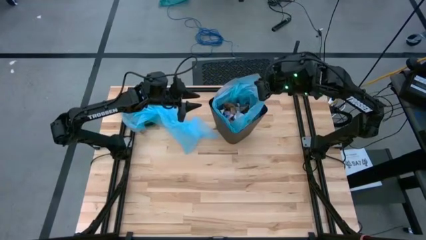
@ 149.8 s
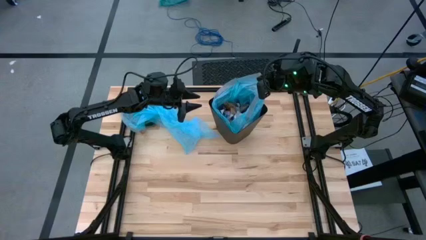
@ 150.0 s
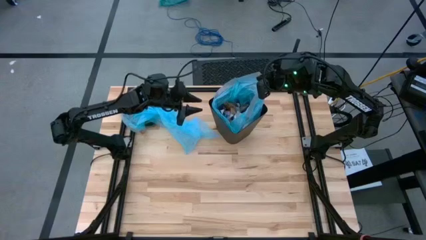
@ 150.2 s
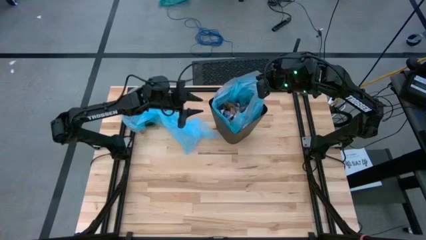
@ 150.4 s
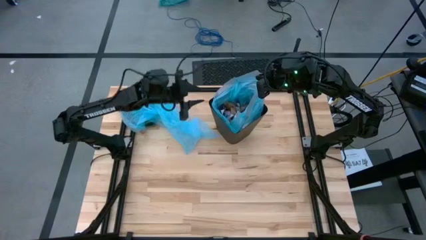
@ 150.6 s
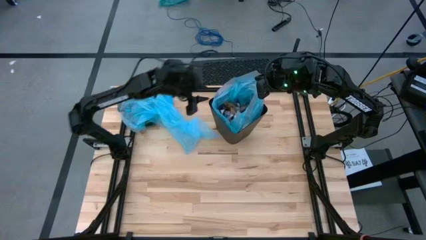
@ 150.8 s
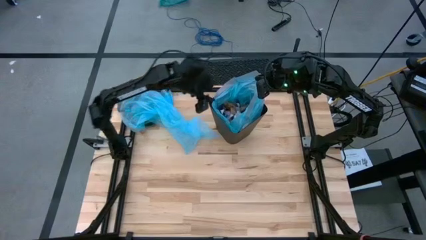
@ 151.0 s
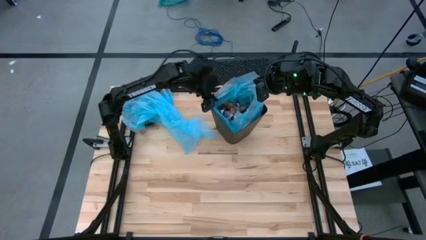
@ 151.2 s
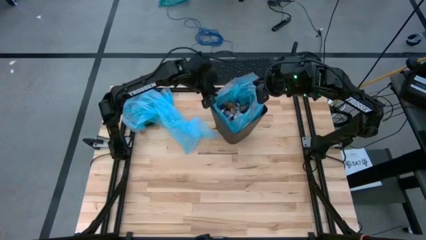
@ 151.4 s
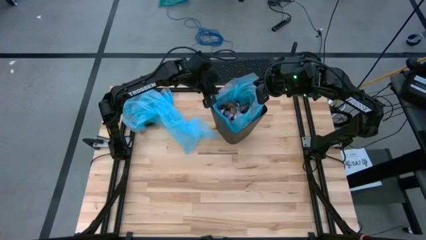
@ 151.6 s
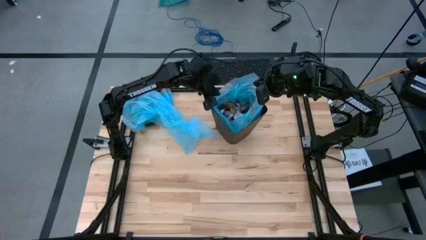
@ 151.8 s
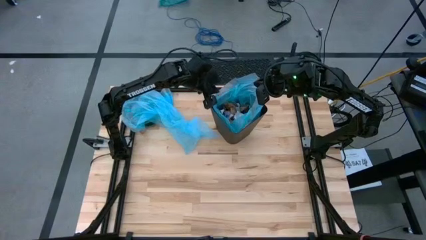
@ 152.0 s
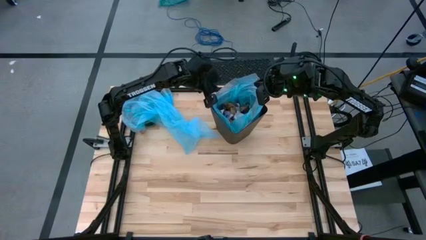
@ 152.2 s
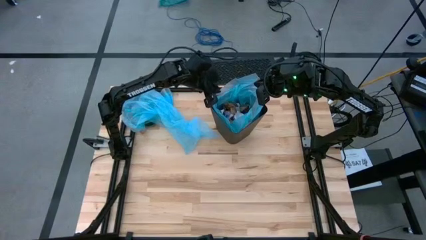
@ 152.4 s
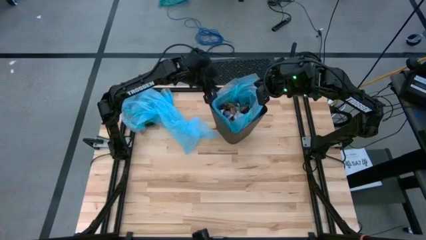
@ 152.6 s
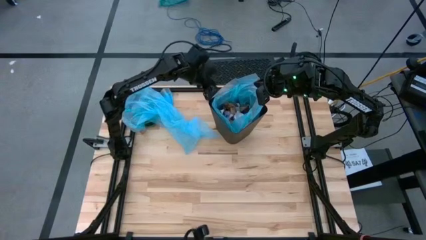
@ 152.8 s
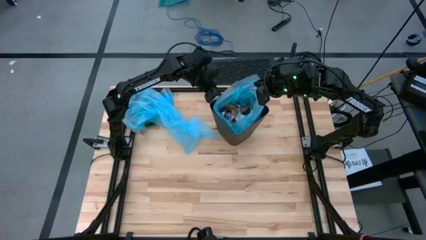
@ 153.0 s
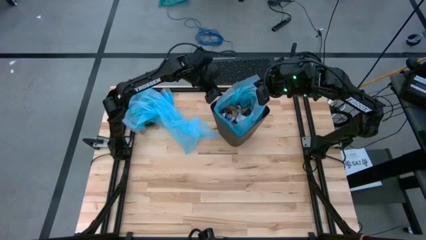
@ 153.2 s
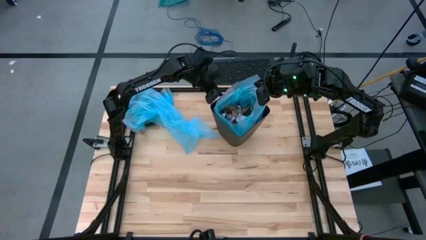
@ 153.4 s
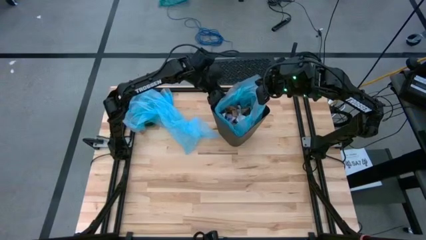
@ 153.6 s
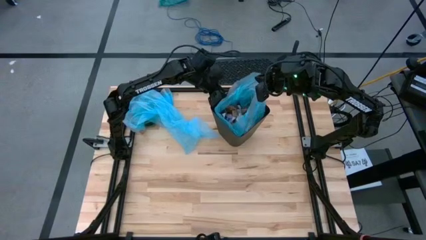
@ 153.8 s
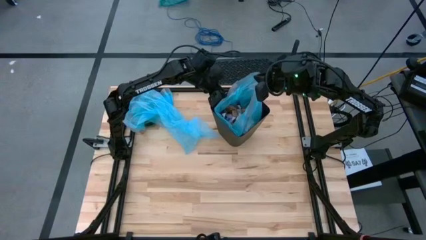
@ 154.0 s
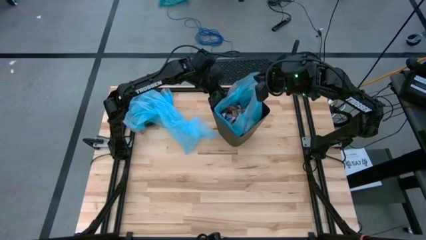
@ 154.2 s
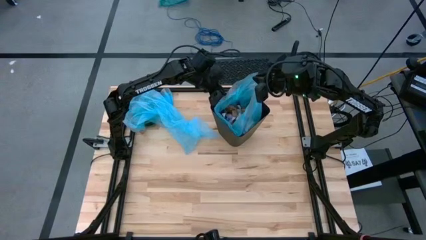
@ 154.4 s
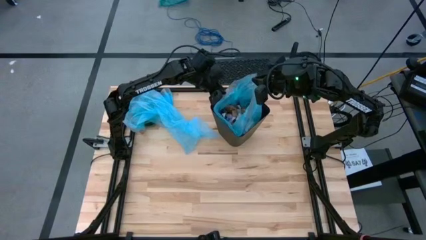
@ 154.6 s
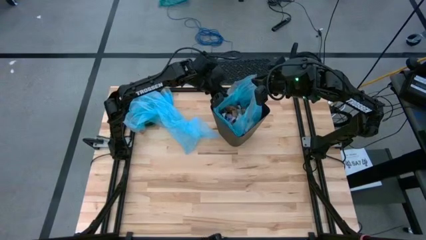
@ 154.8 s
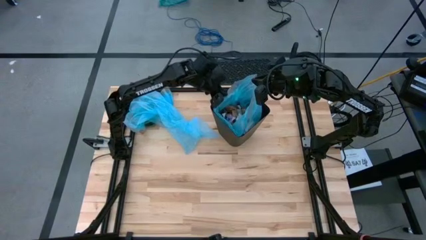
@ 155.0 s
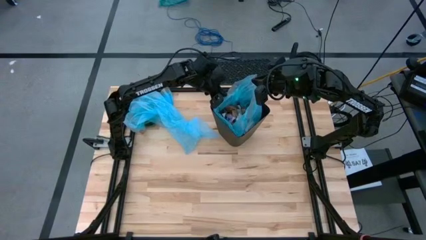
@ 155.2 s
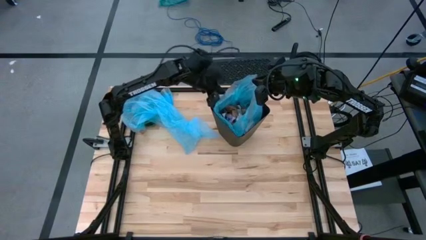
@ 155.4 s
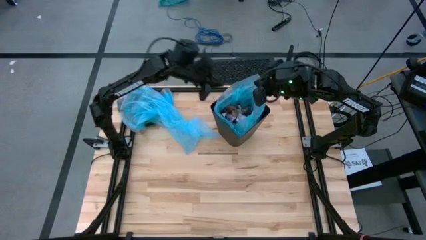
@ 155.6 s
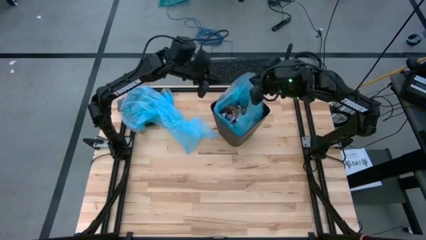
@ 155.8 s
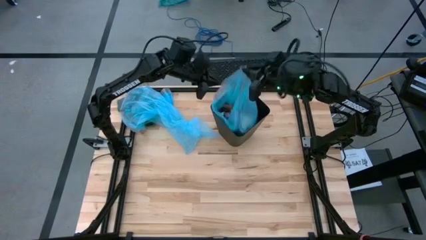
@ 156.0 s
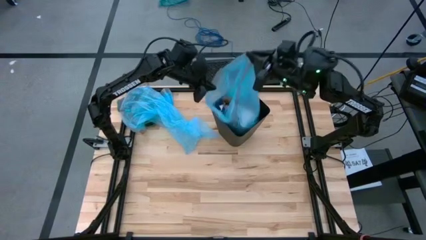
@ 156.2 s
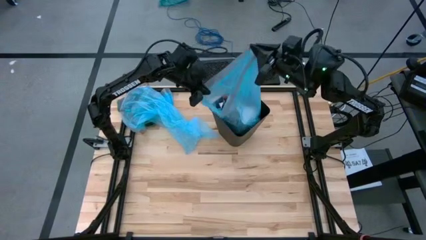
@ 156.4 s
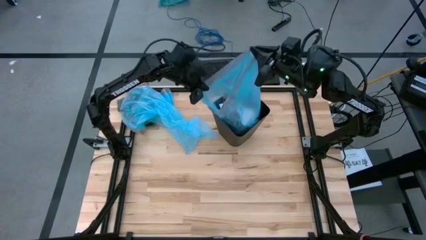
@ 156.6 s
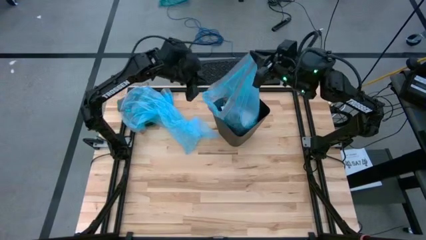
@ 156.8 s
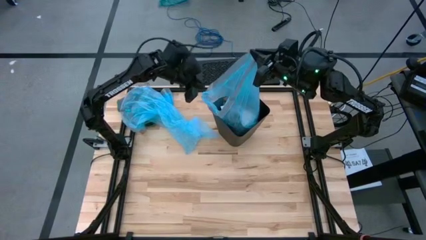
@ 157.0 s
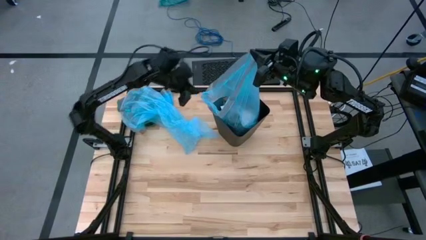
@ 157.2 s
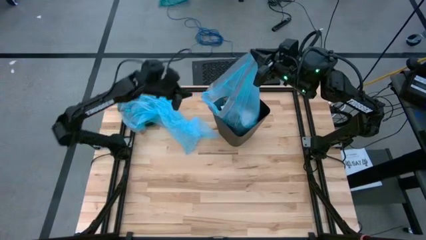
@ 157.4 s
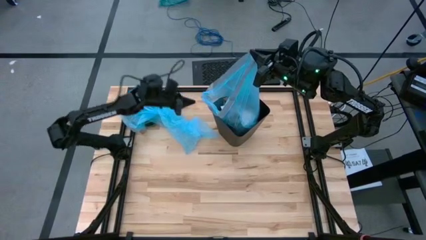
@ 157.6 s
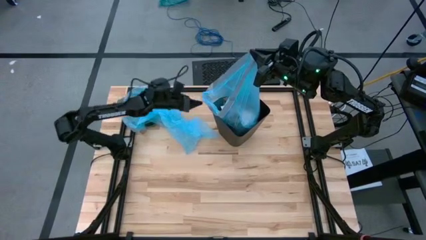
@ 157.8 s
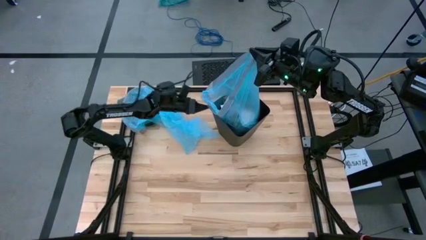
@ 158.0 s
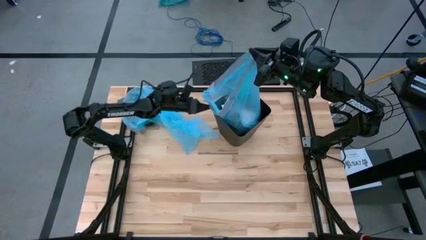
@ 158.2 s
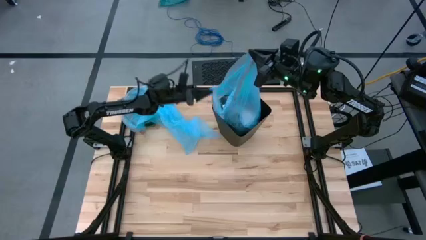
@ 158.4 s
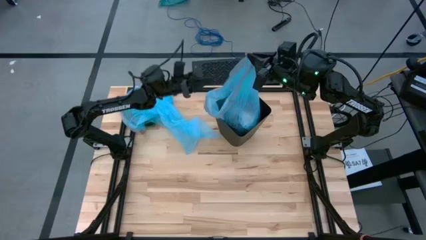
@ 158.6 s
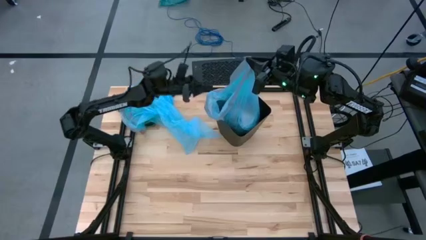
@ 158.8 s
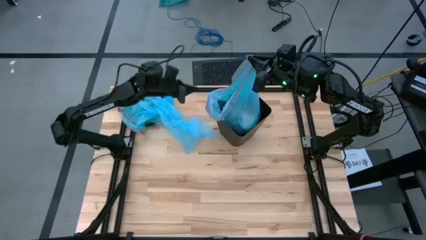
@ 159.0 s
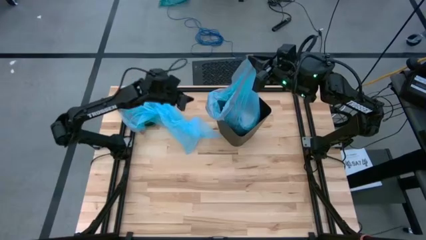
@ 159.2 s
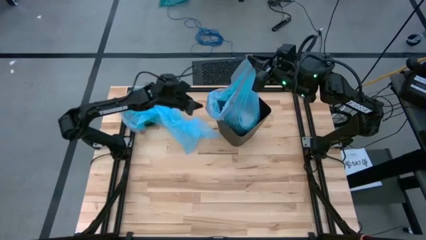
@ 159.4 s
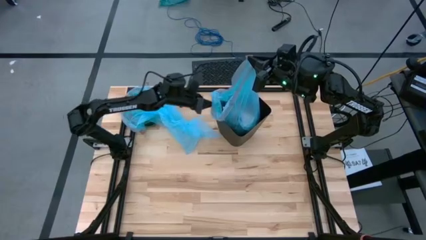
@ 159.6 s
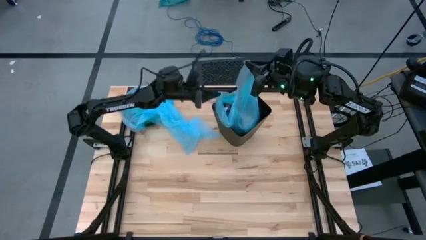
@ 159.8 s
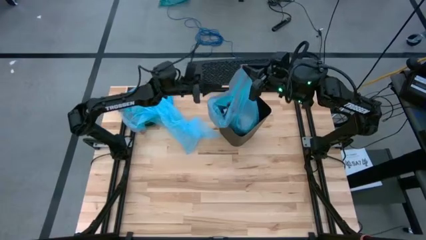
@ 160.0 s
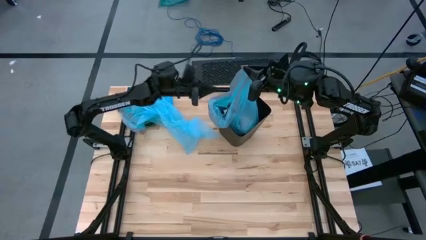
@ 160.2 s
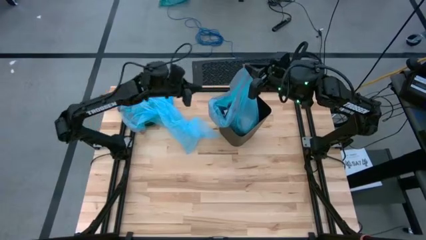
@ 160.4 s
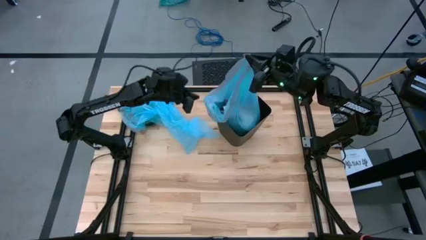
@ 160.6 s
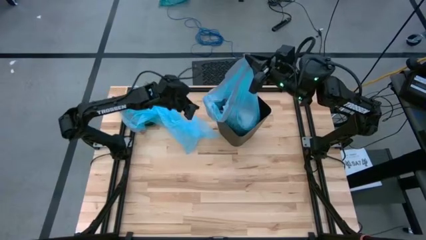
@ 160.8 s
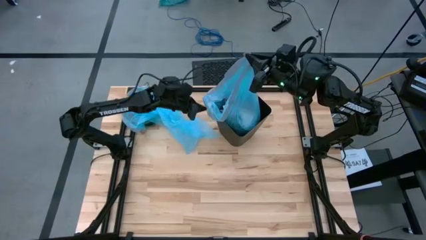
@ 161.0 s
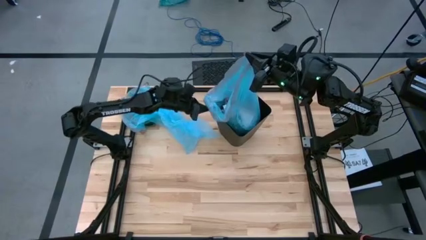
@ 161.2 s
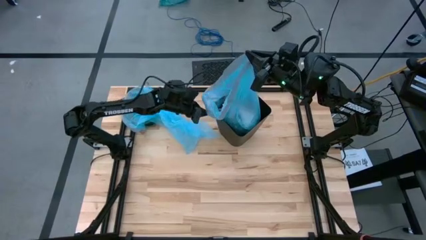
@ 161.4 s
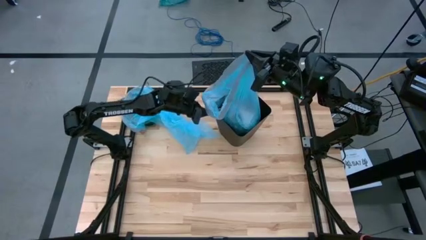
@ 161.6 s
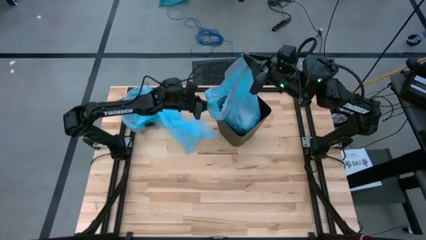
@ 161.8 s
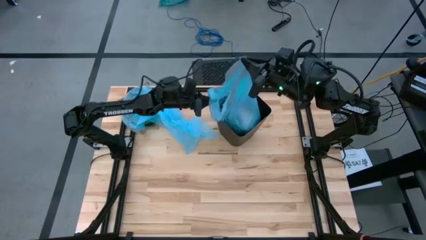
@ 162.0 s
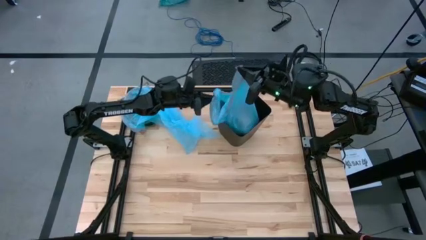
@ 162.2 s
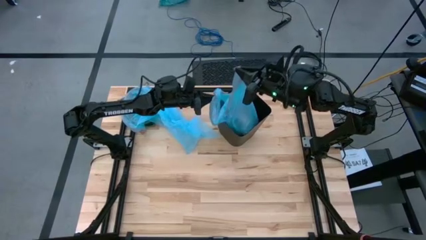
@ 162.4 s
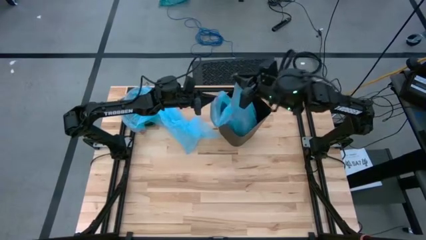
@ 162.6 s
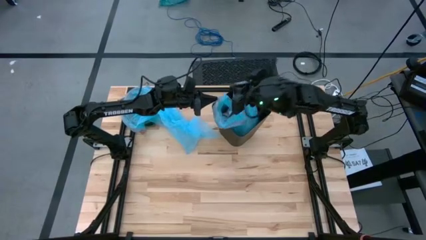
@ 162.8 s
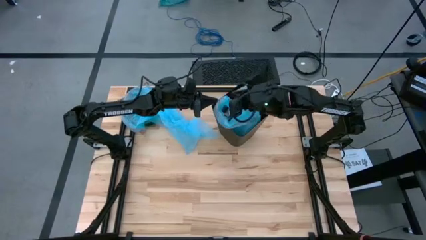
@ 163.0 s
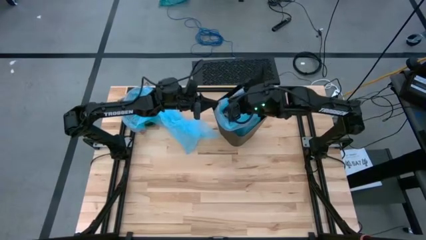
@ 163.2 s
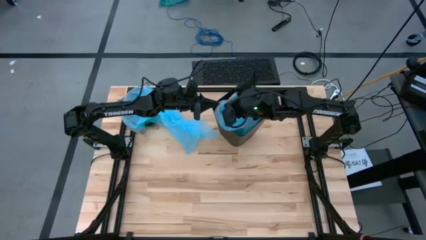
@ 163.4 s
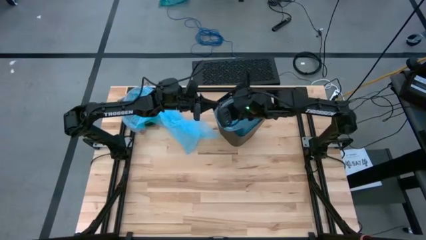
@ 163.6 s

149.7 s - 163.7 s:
Task: place trash/remove bag and relplace
Remove the blue trash bag from the trash bin
